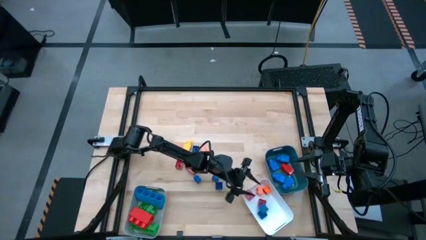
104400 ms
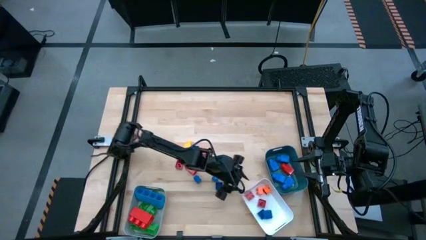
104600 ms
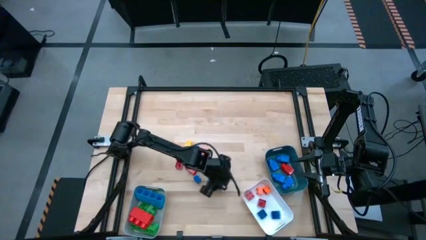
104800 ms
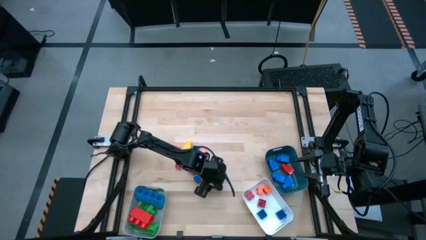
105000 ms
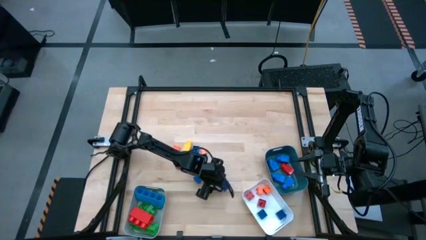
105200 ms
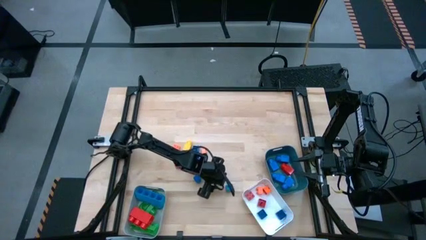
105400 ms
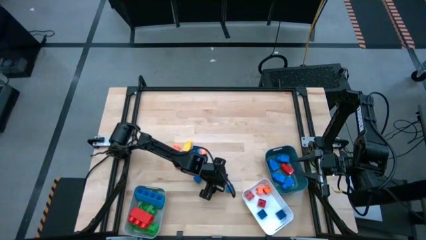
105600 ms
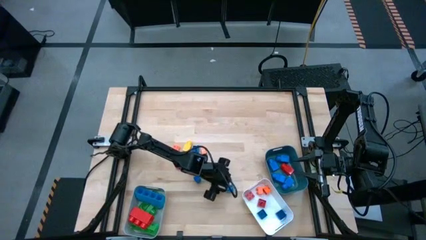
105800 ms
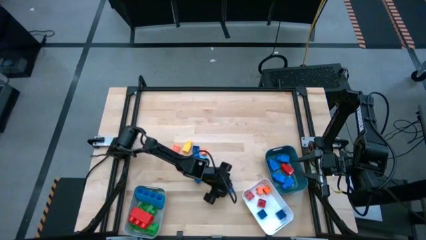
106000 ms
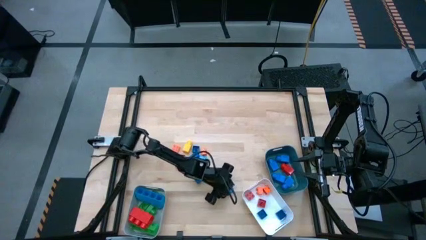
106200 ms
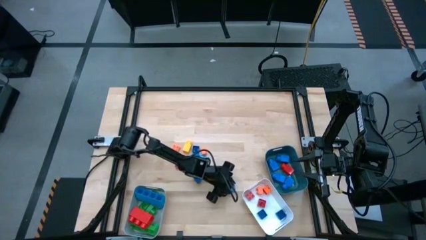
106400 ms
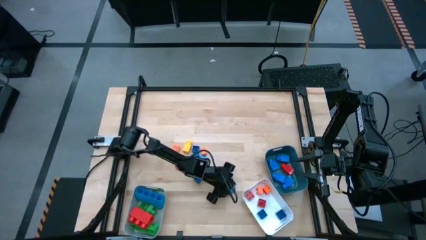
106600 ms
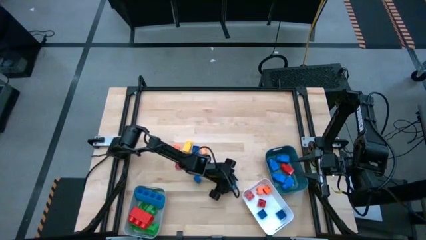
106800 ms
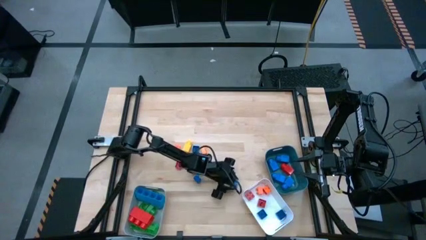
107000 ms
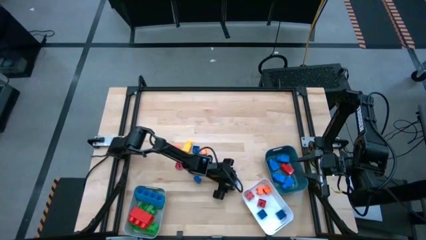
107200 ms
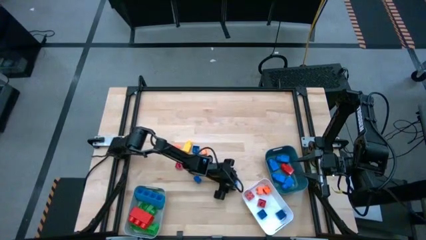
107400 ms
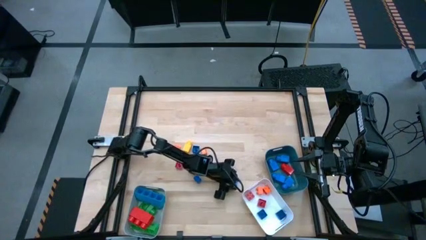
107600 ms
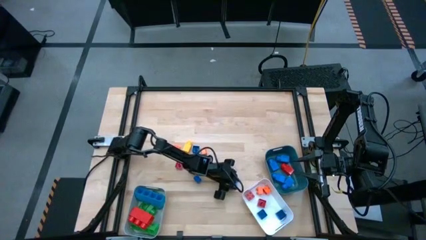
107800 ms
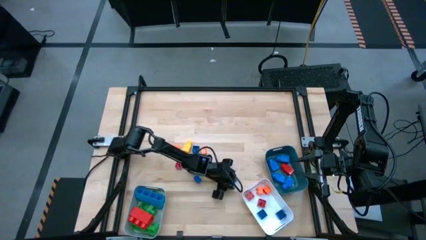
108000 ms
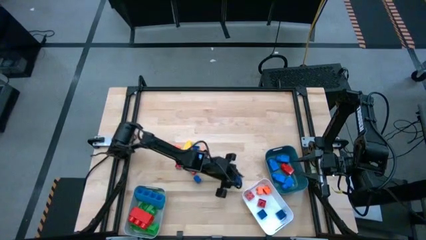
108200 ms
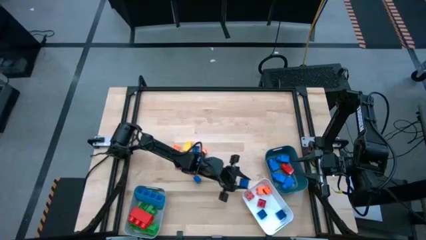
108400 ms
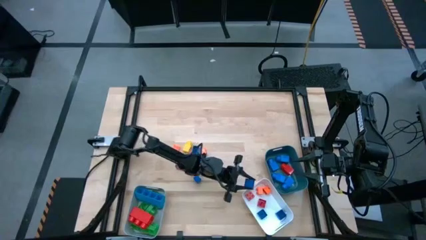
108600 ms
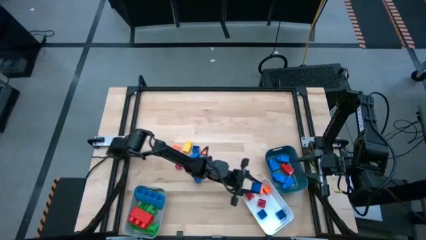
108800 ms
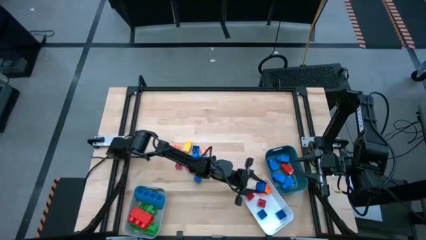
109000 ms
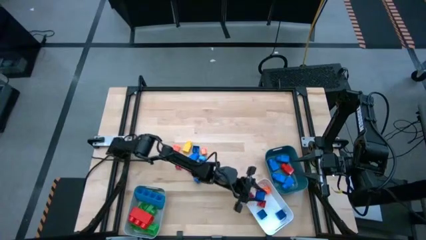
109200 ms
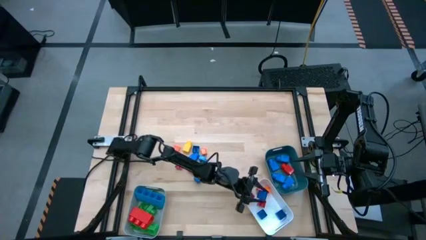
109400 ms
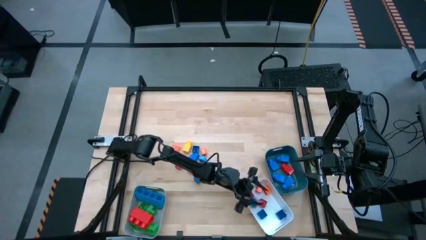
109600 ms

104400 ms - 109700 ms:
Task: Sort blocks by size
Put the small square blue game piece into the white bin

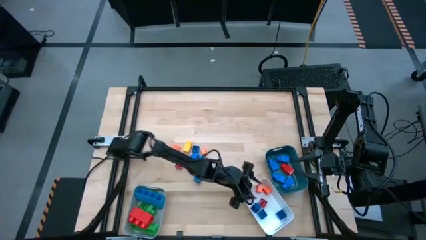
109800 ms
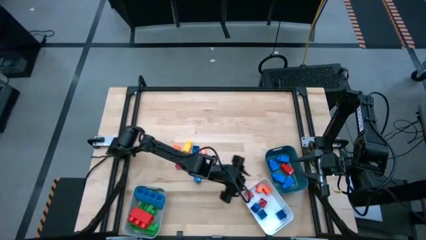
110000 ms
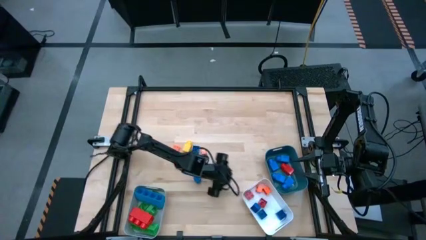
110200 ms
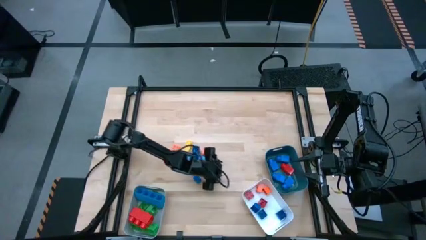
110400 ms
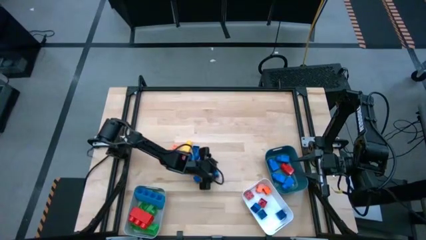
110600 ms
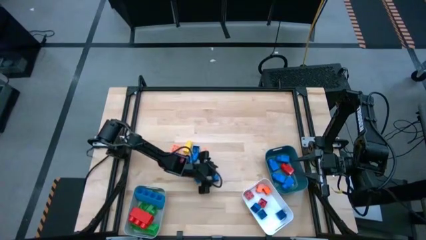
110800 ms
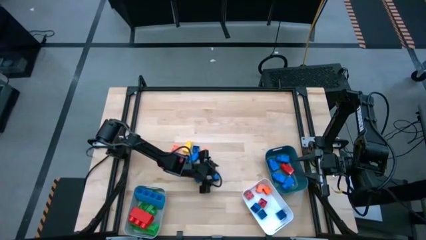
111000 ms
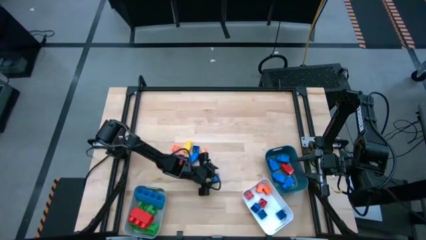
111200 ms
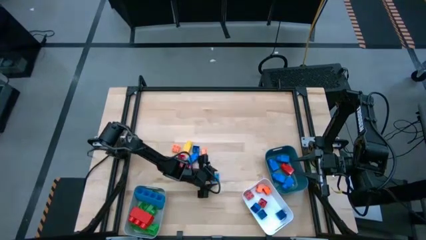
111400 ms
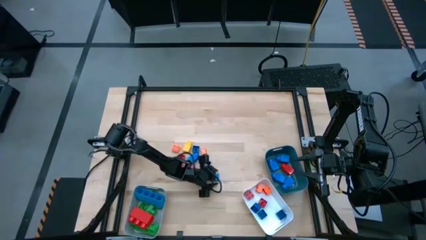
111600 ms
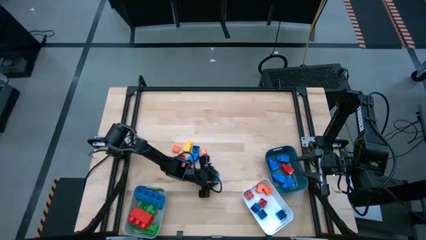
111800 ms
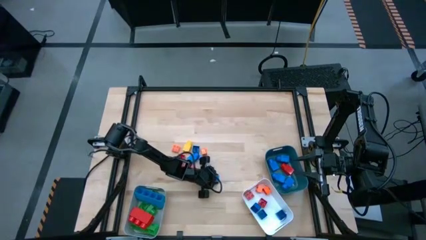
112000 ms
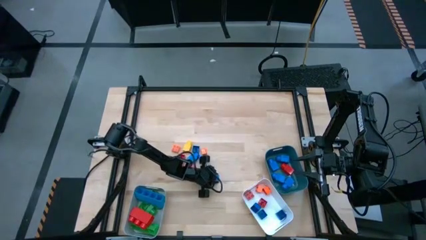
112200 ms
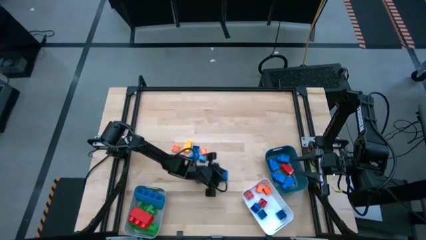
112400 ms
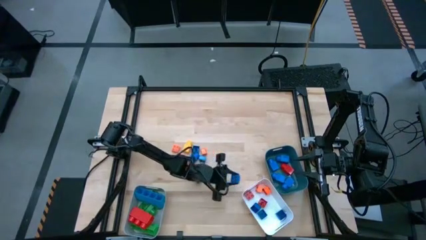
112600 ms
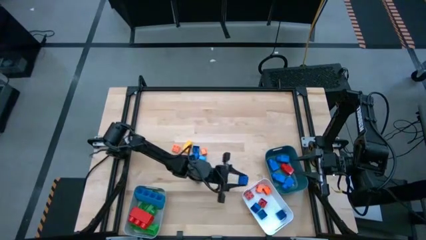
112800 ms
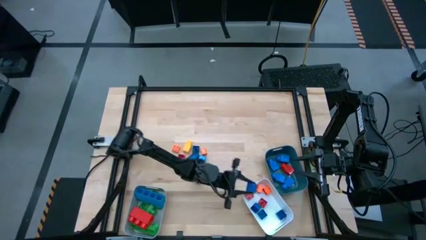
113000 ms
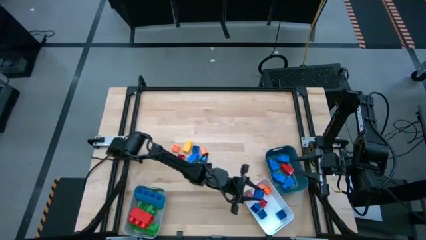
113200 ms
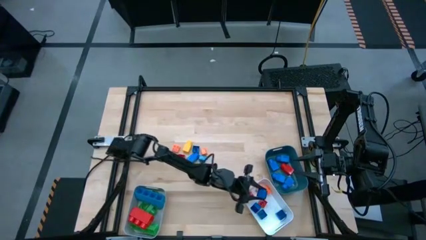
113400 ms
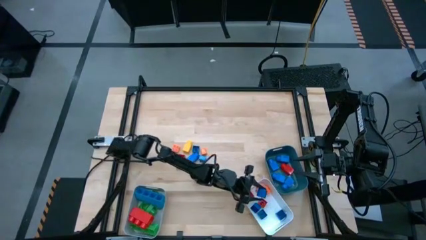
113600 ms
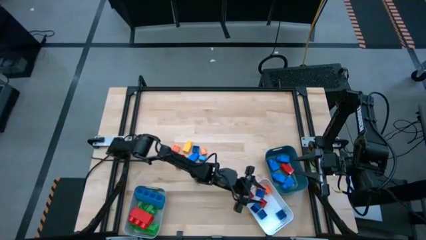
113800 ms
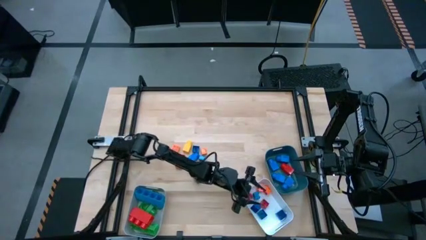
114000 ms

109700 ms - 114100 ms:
Put the small square blue game piece into the white bin

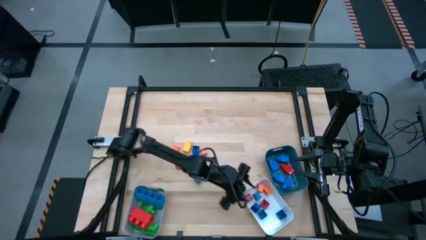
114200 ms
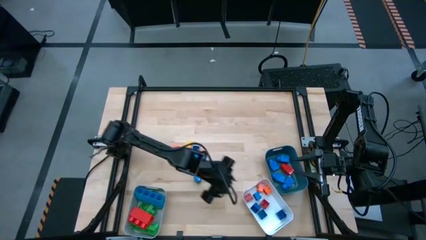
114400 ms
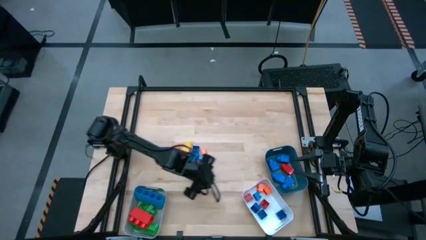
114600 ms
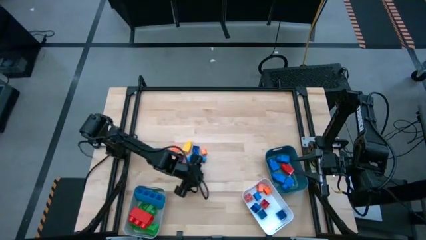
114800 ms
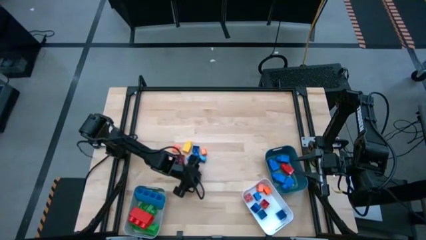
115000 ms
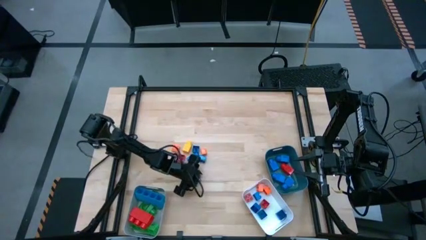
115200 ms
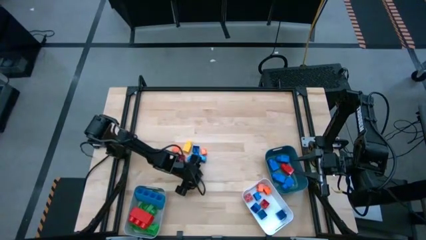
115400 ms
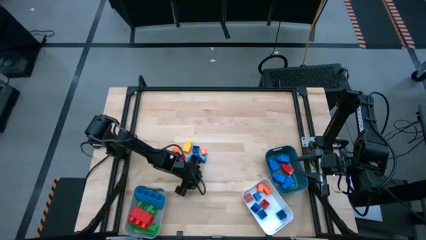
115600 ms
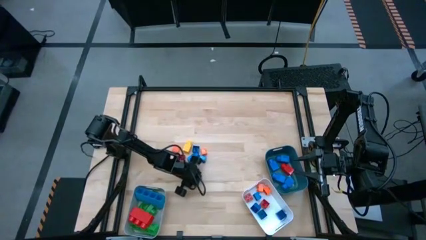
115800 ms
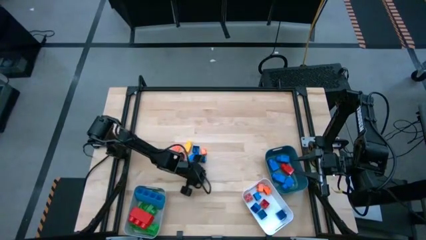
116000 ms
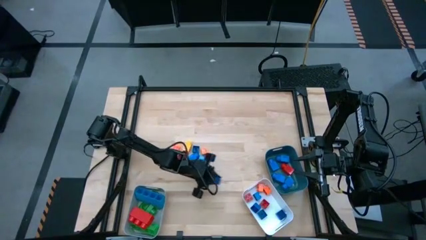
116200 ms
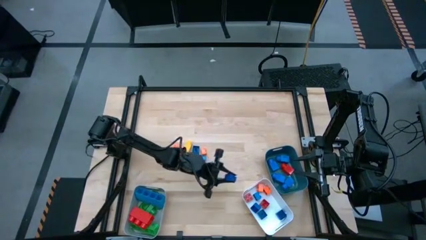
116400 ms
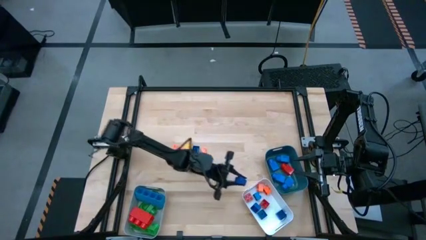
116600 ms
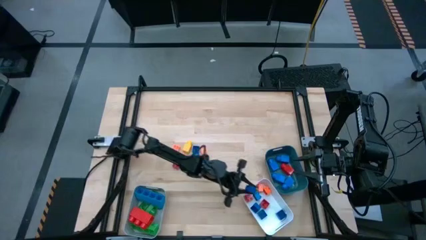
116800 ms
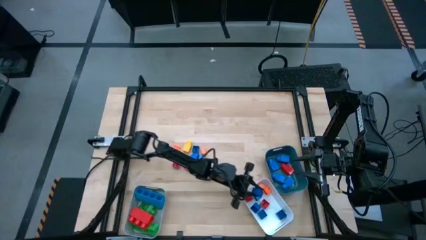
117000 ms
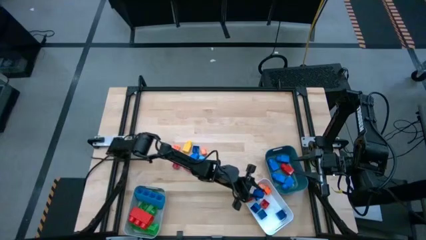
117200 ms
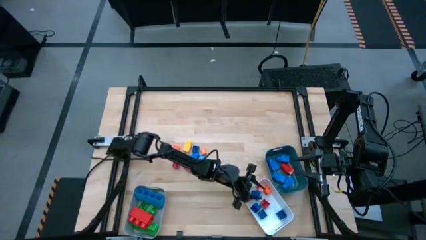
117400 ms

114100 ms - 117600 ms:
Put the small square blue game piece into the white bin

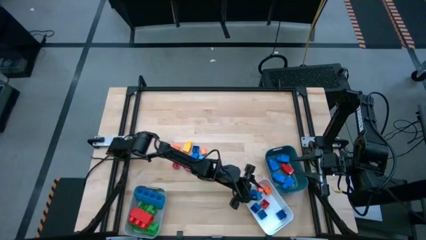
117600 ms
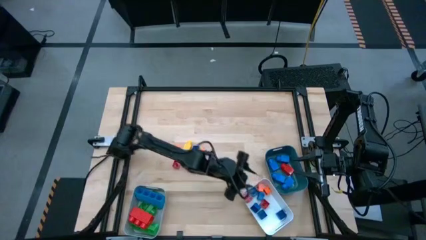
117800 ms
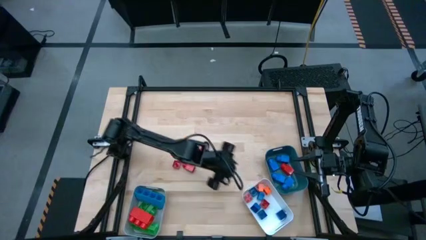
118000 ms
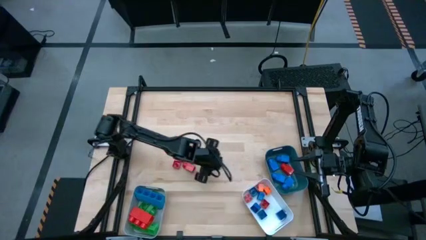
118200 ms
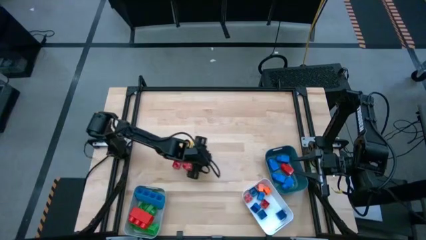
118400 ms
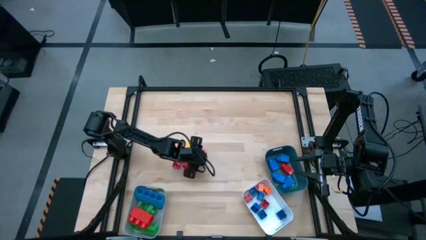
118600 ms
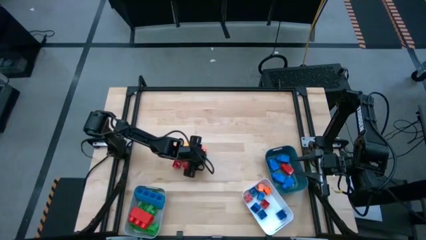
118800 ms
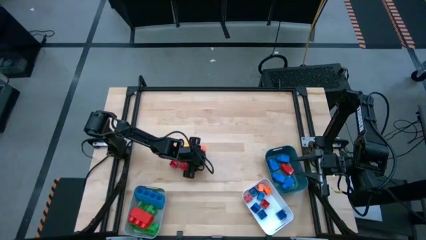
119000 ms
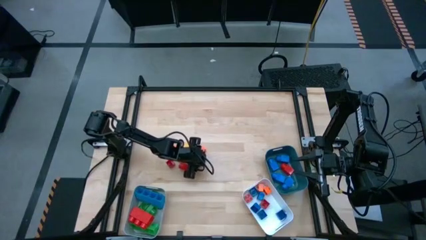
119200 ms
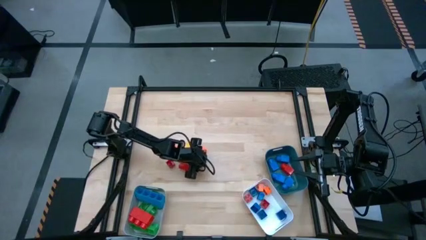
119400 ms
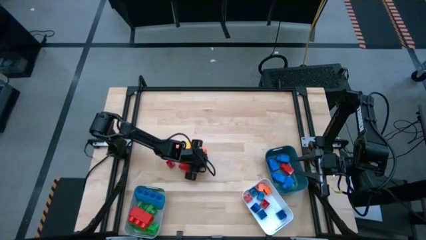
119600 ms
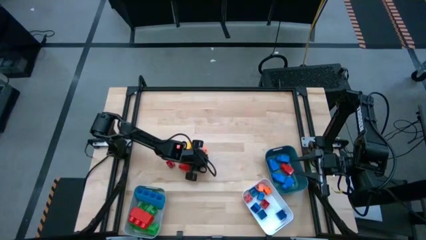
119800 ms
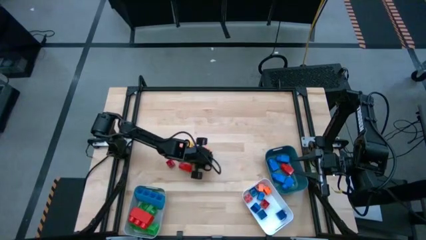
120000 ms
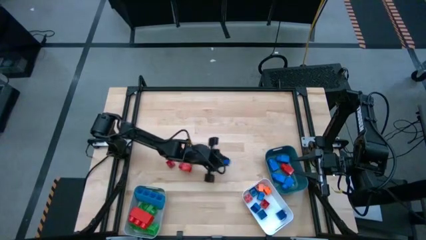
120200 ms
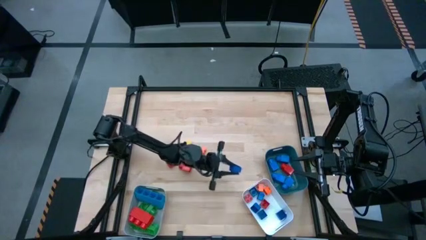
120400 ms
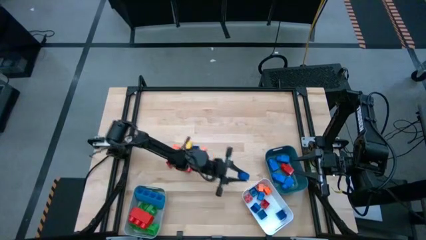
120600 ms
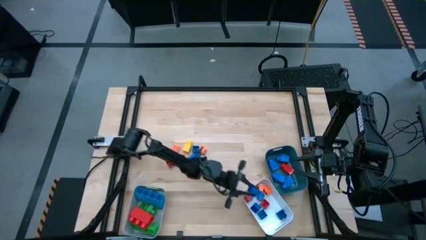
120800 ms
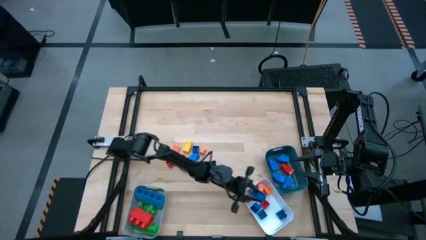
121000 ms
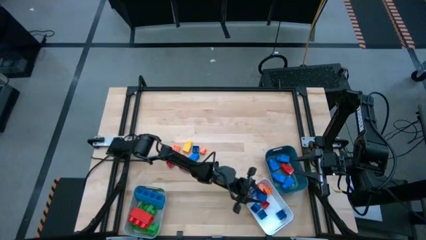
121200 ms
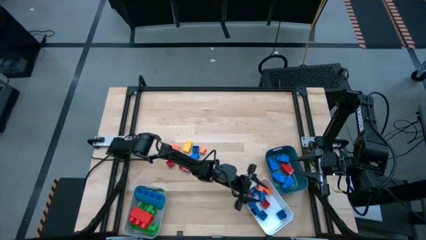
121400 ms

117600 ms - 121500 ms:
Put the small square blue game piece into the white bin

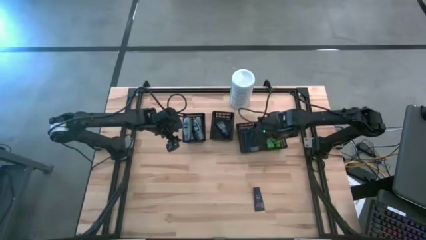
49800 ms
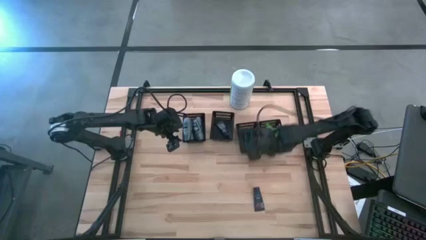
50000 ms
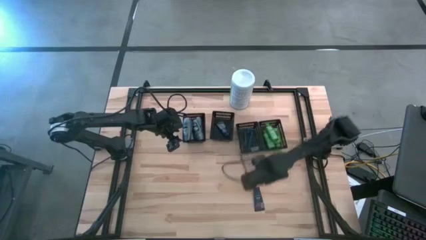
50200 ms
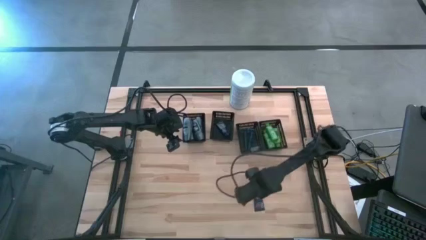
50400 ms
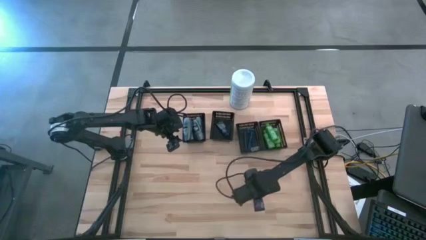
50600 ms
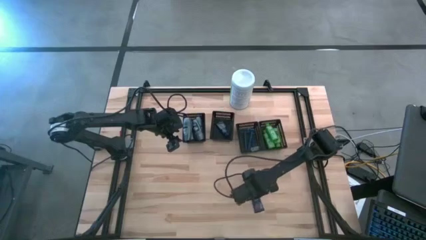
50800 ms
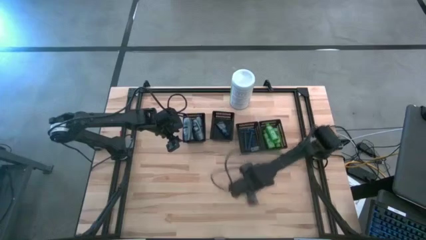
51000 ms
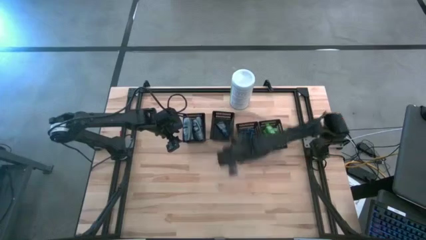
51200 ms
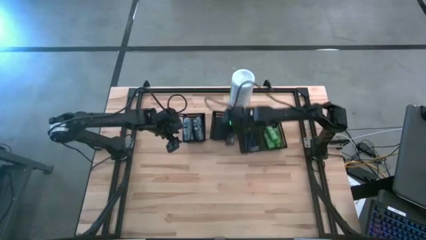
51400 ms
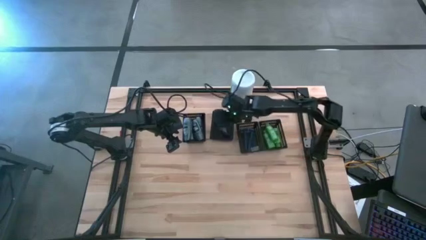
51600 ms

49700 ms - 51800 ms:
Task: Pick & Place Travel size toiletries
Put the blue shave cream into the middle left black bin
